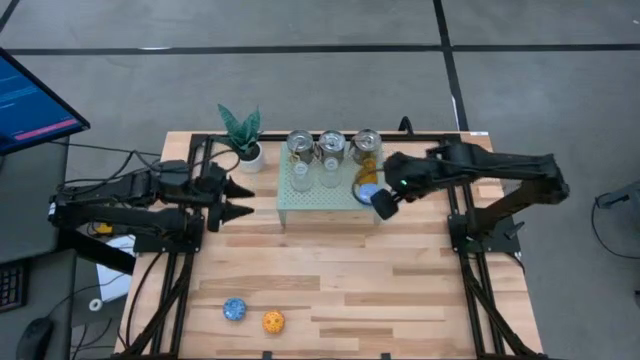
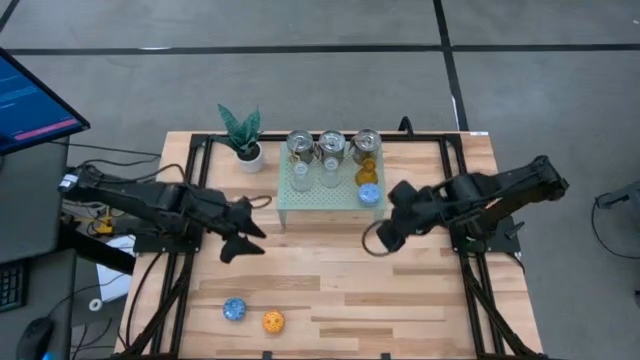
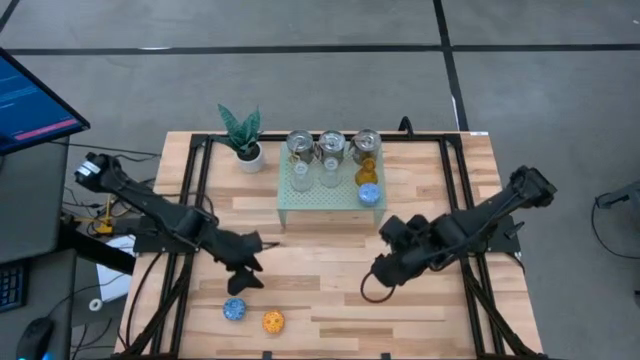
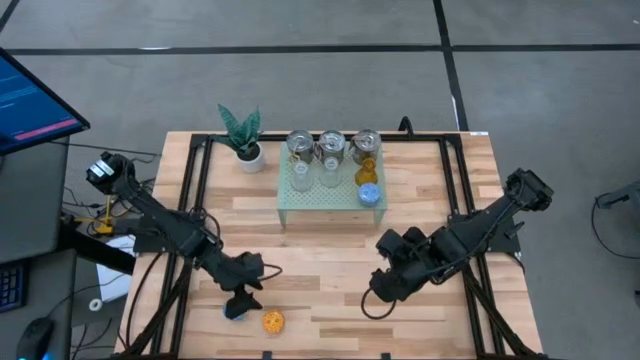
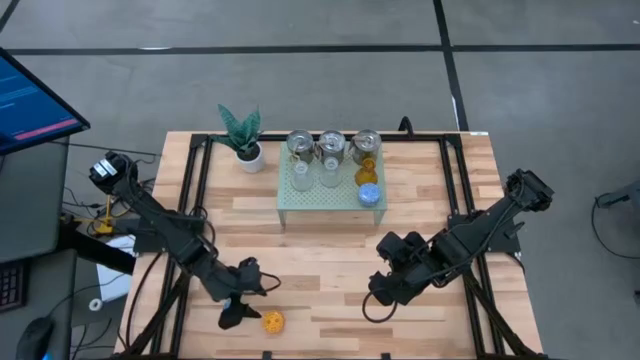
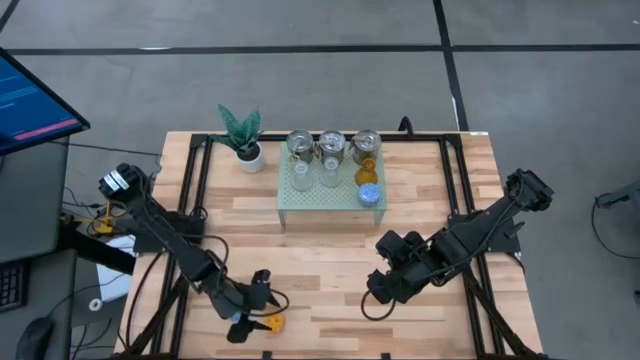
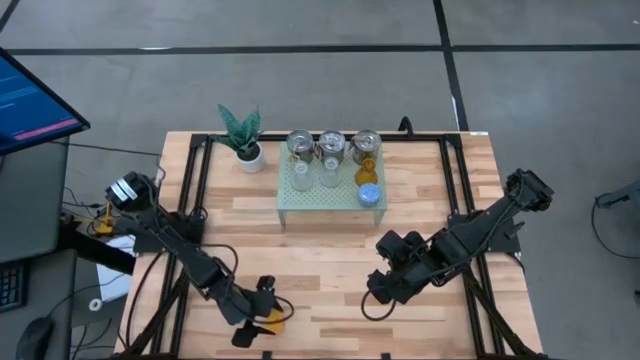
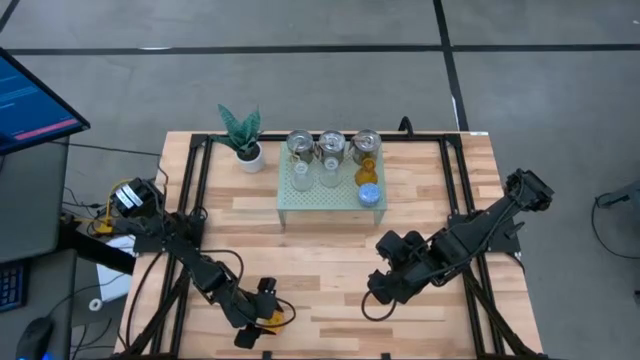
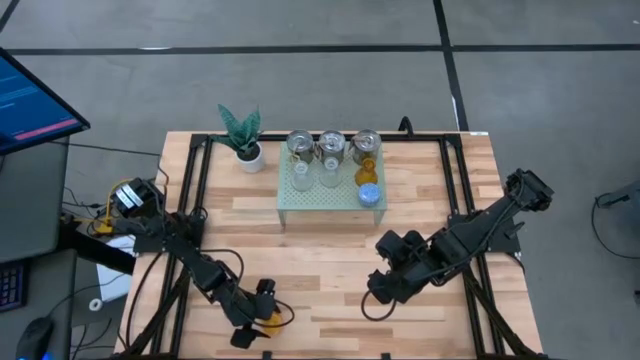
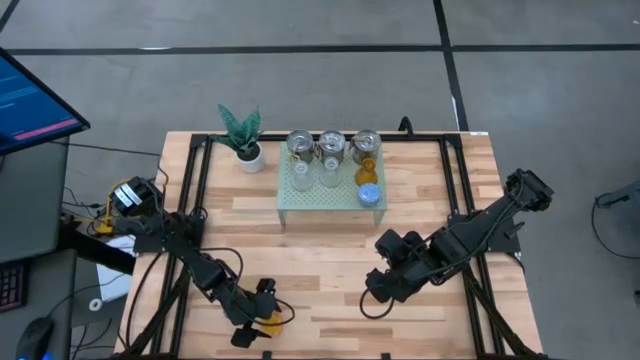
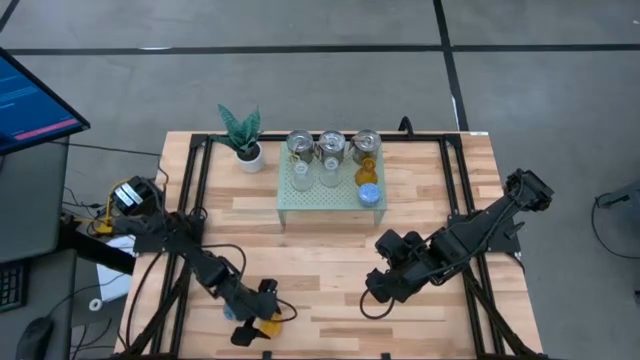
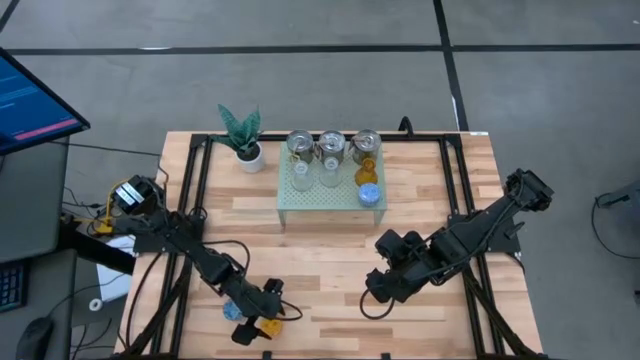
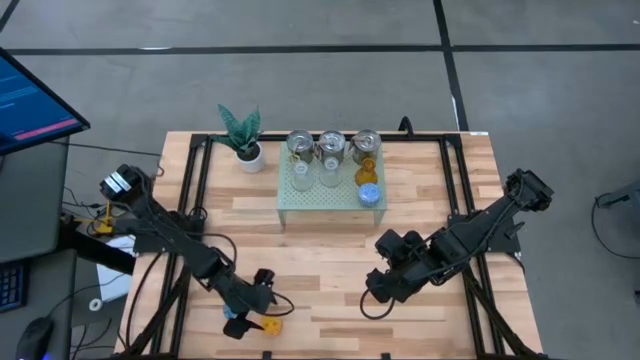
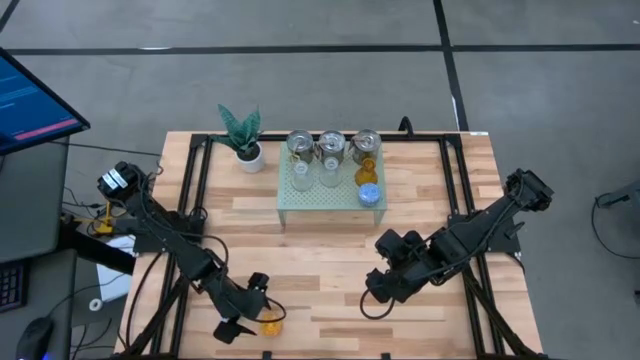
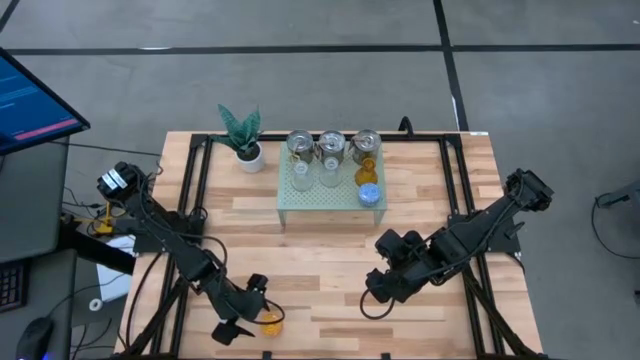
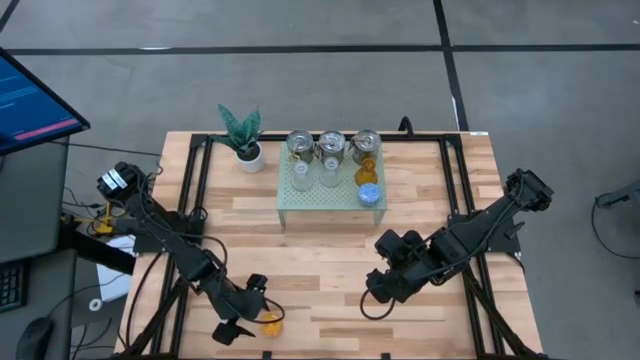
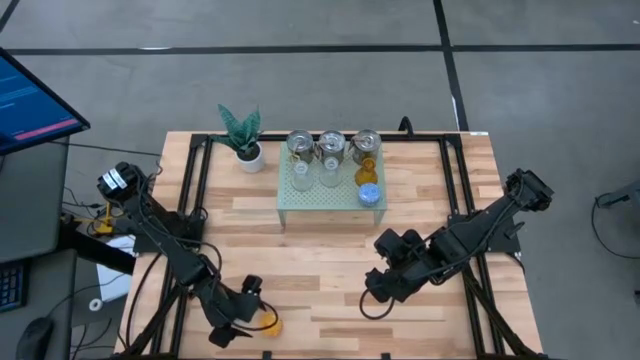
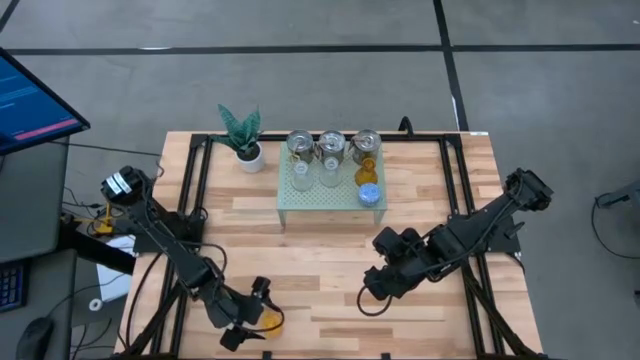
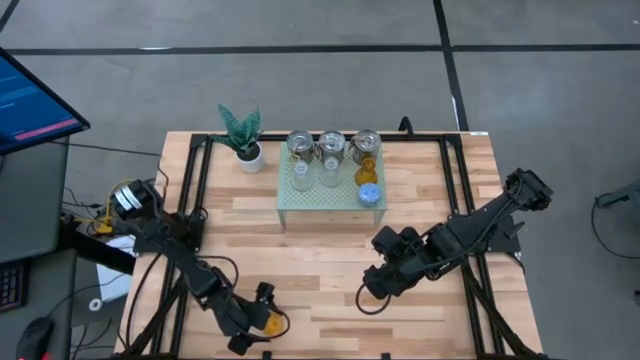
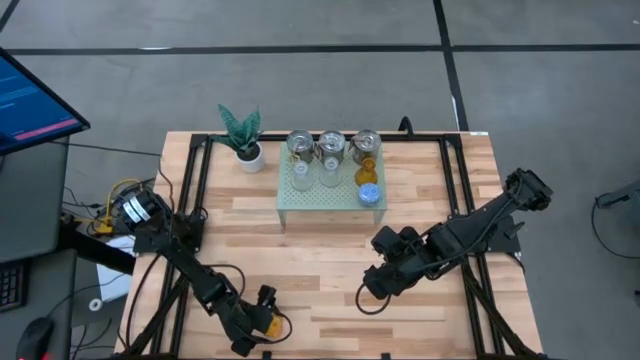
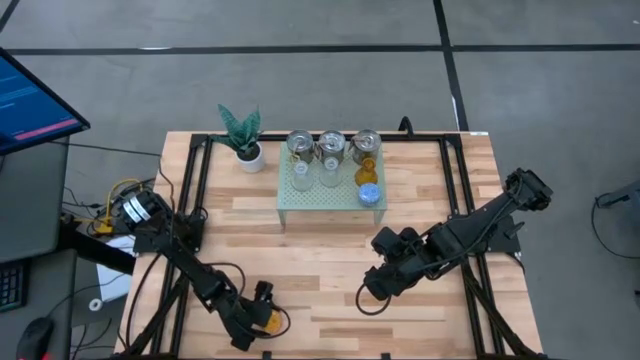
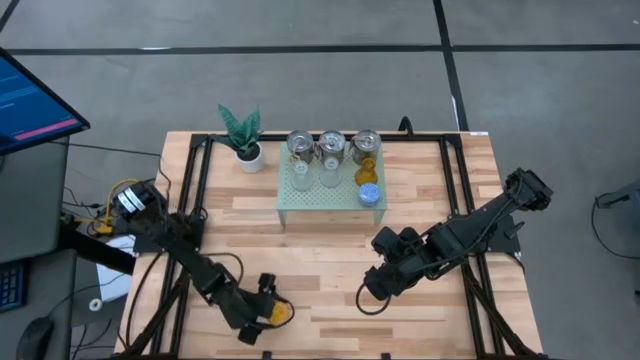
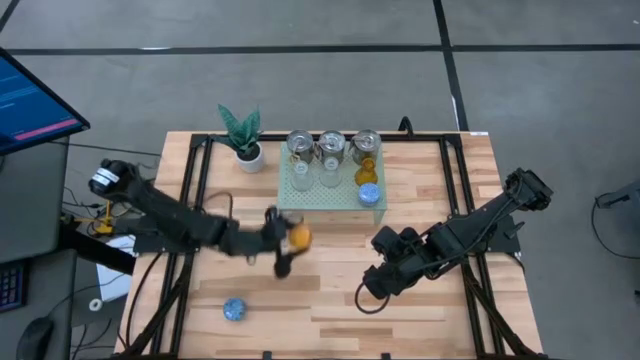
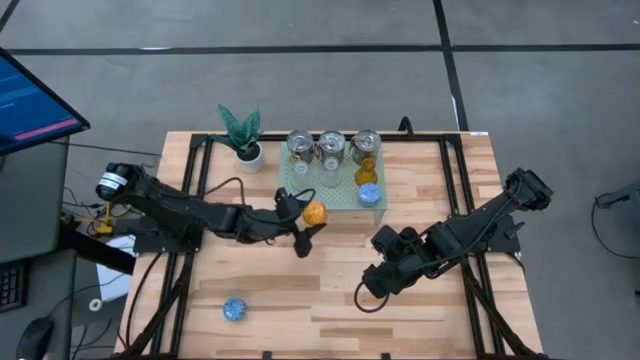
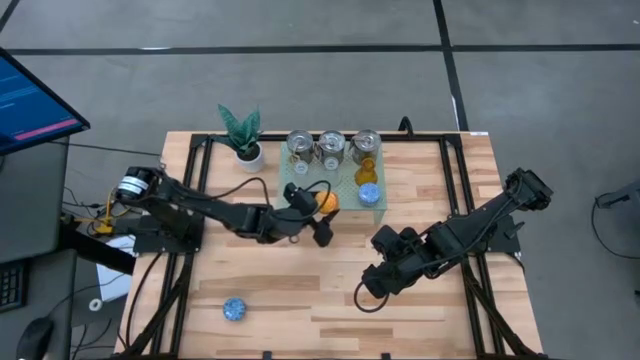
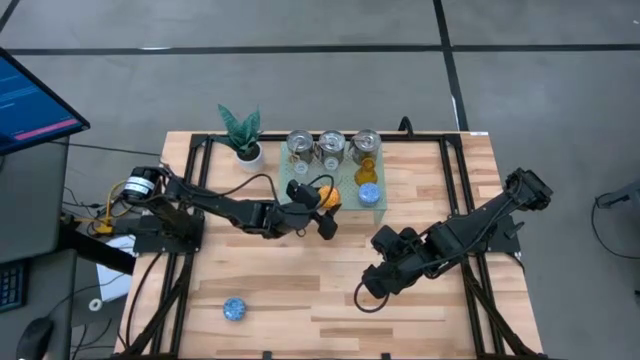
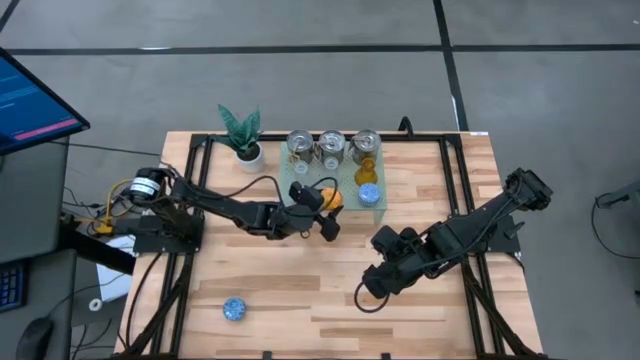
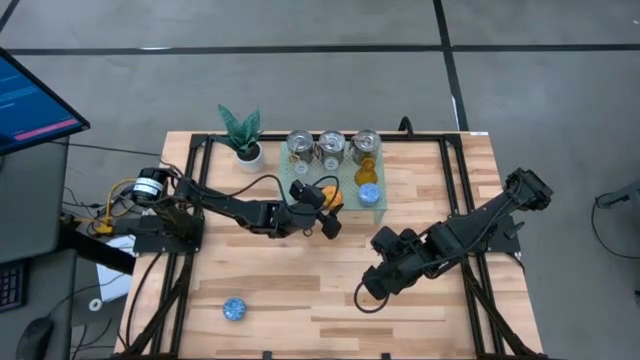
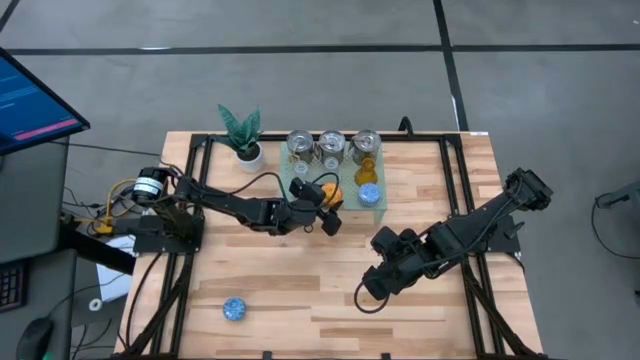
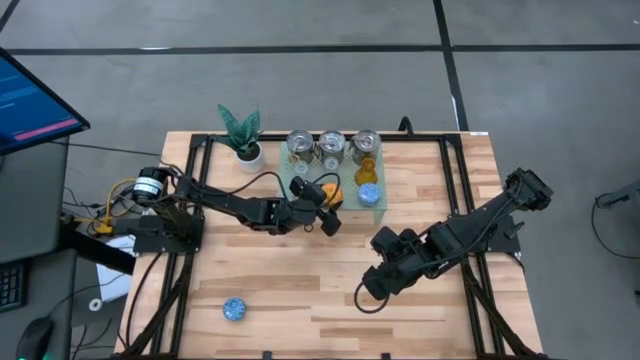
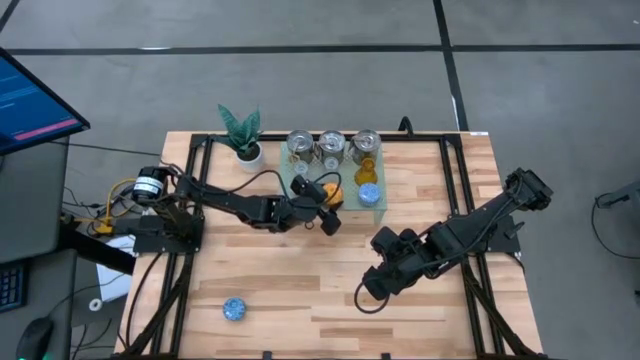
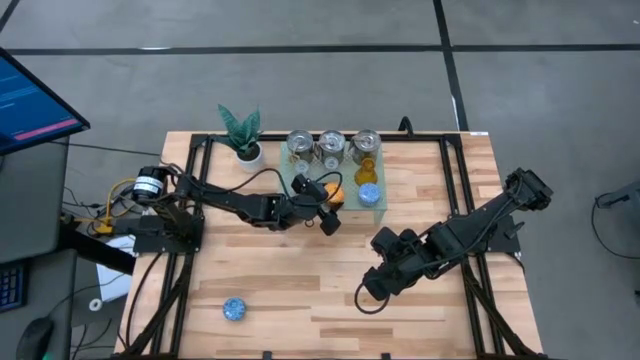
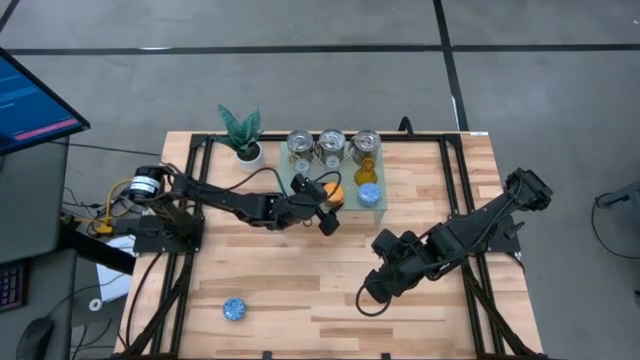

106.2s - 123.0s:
Task: Pick & Place candle stick holders
Put the brown scented candle on the shelf

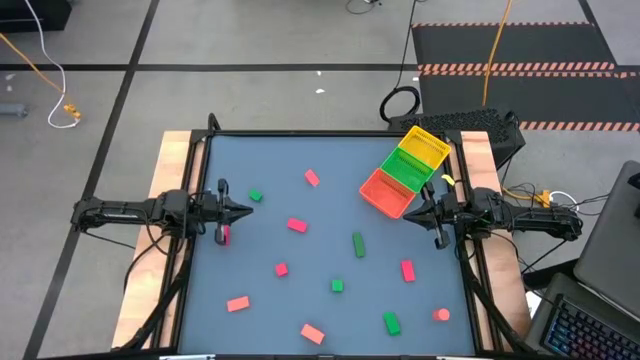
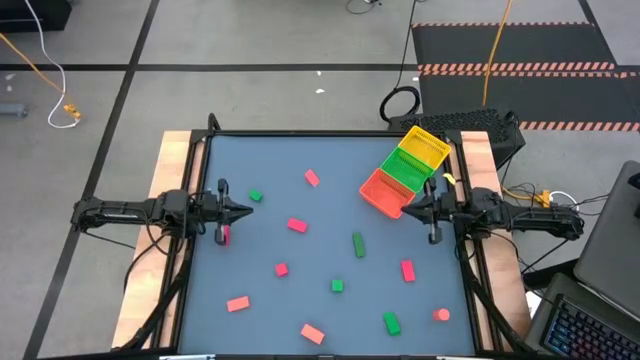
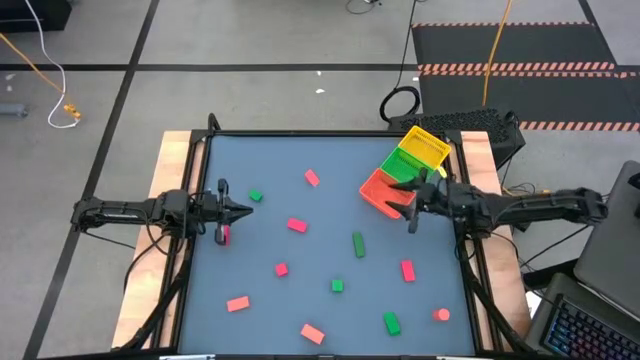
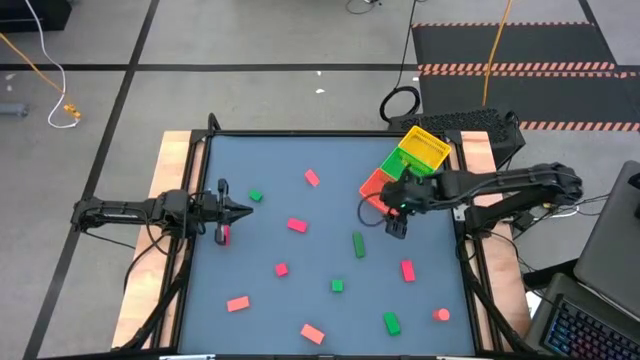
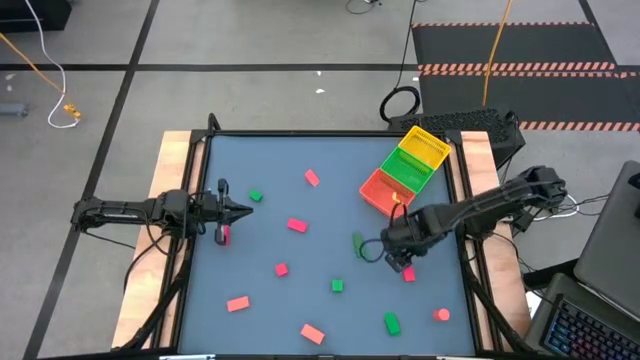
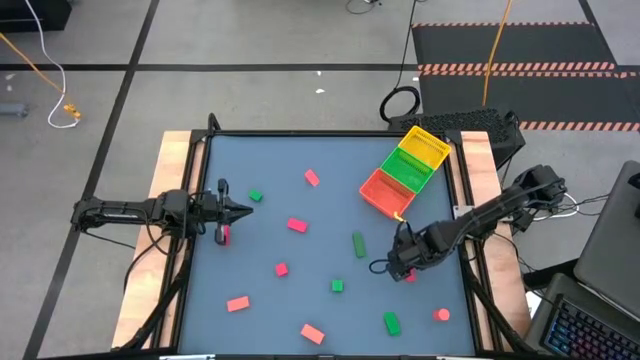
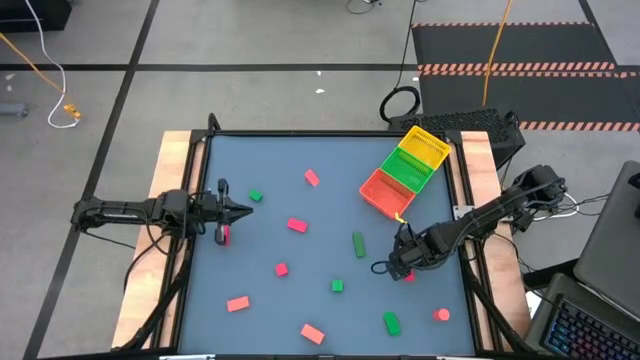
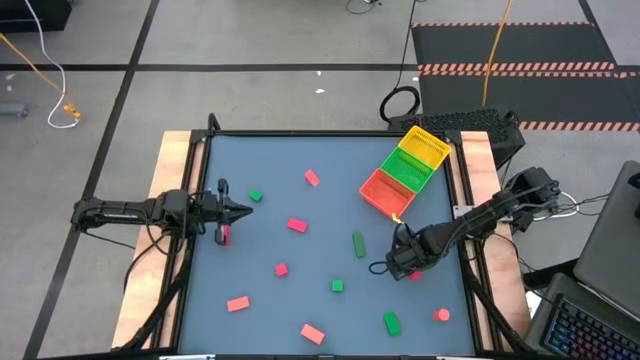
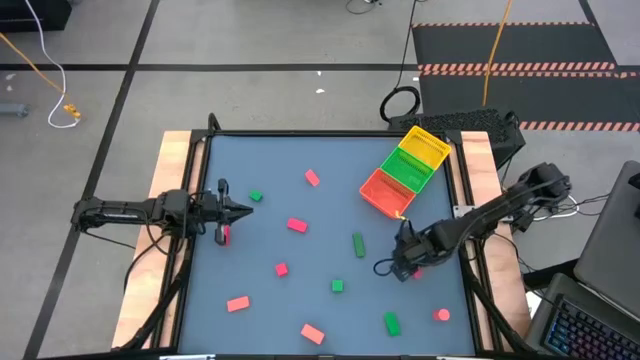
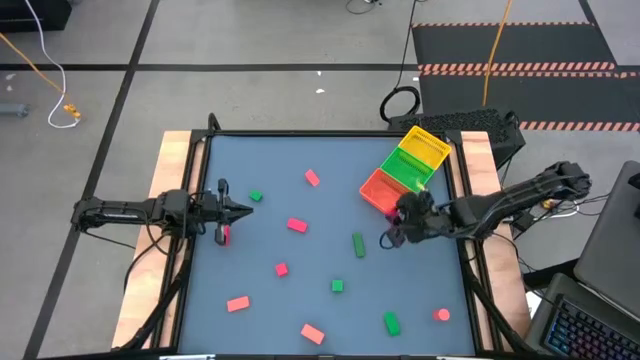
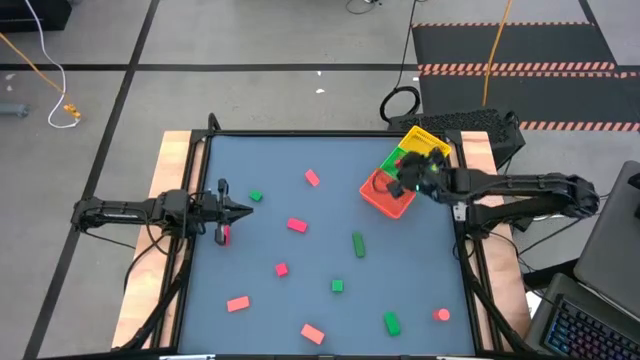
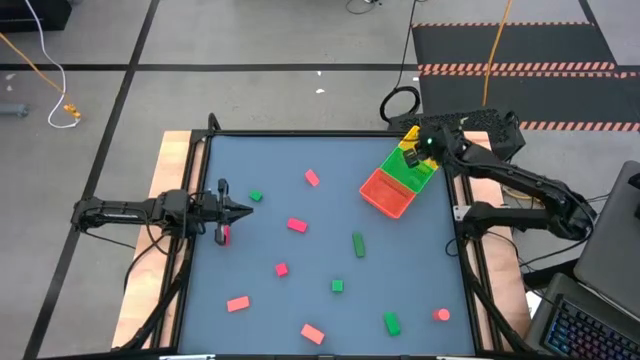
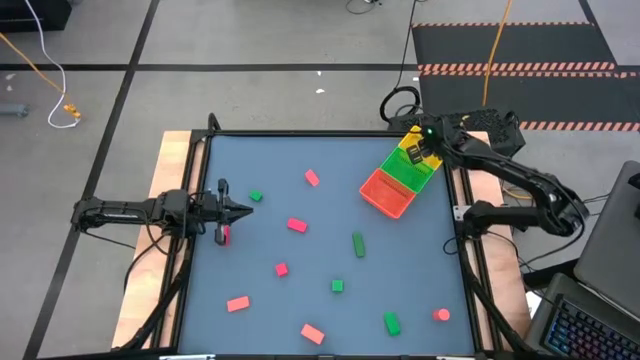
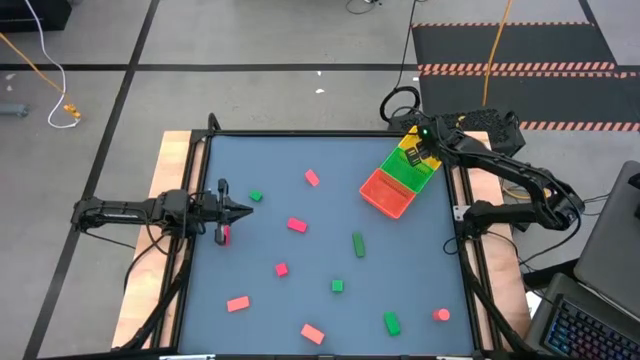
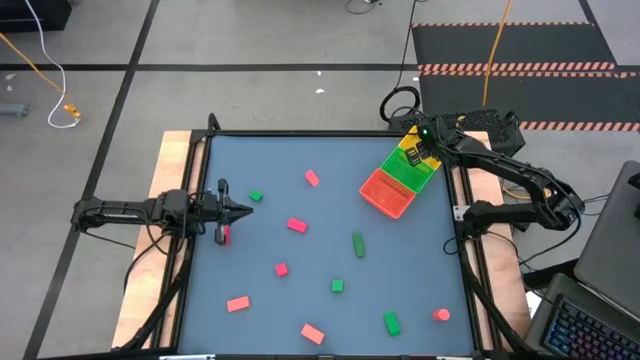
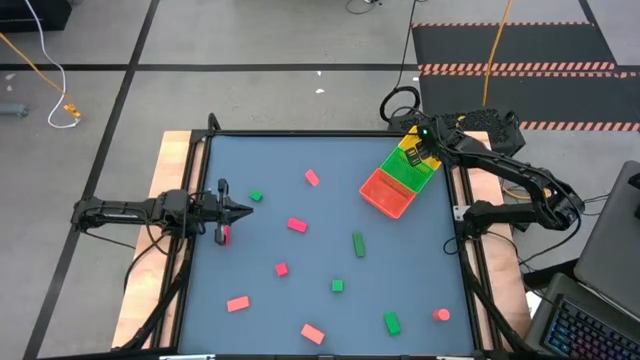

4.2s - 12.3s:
Task: Sort & place blocks by color
Put the red block into the yellow bin
